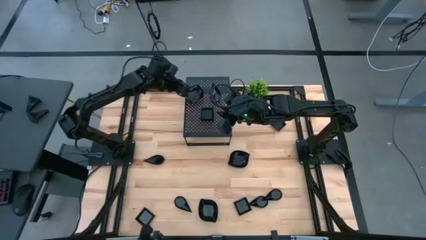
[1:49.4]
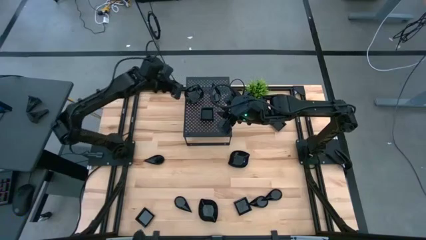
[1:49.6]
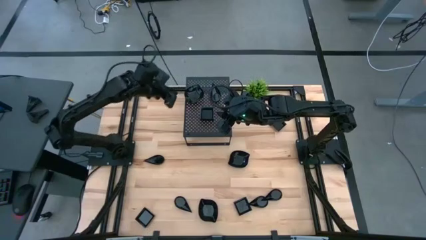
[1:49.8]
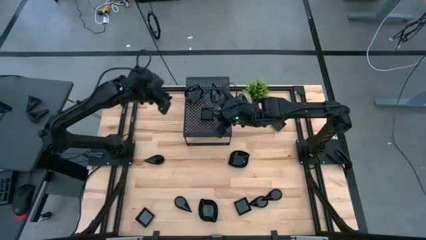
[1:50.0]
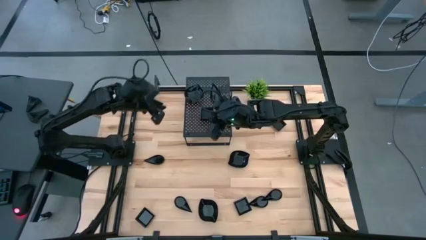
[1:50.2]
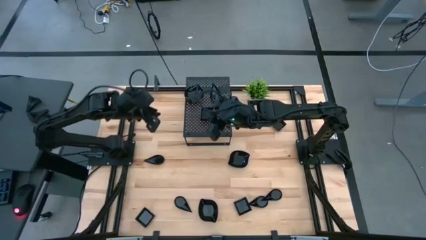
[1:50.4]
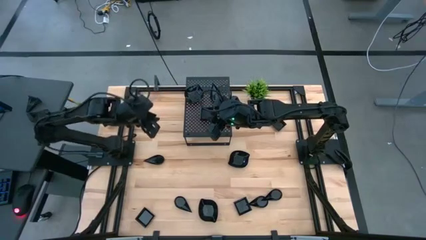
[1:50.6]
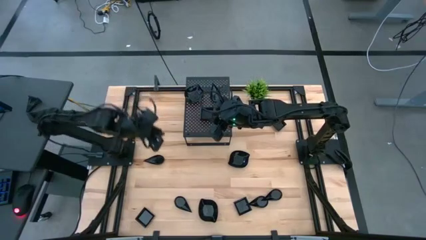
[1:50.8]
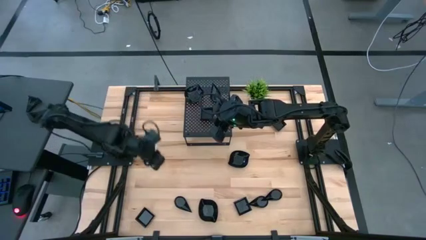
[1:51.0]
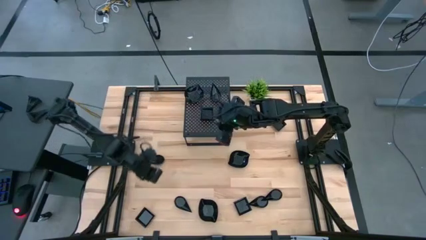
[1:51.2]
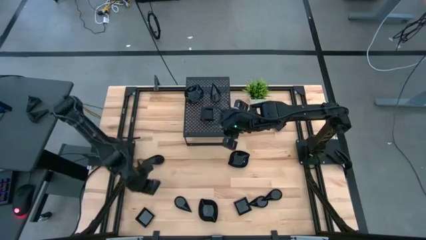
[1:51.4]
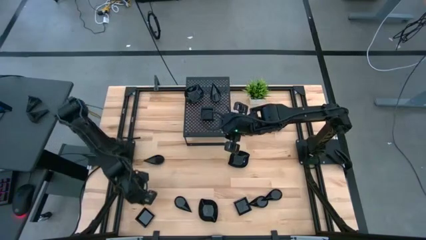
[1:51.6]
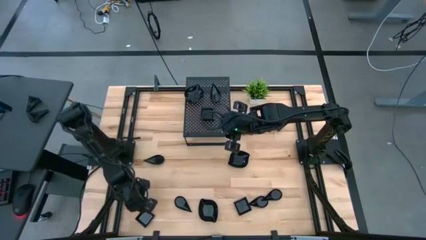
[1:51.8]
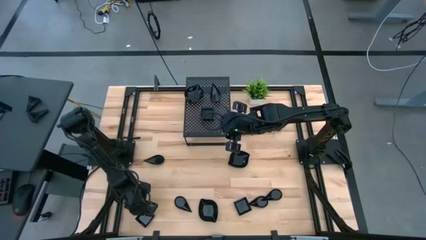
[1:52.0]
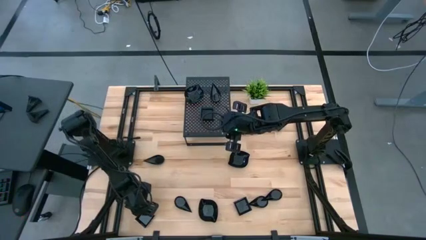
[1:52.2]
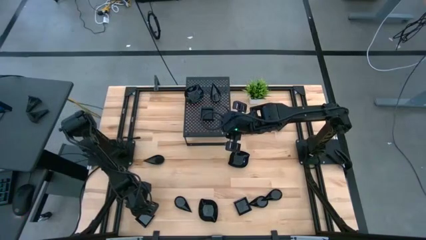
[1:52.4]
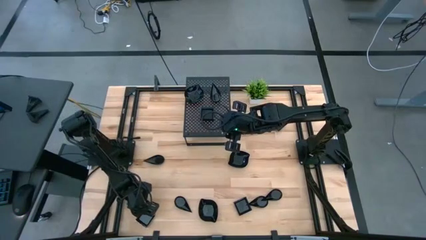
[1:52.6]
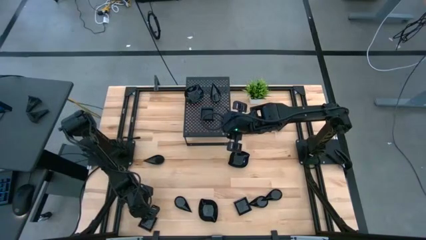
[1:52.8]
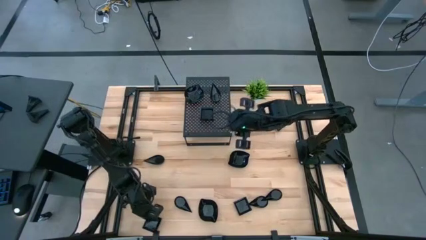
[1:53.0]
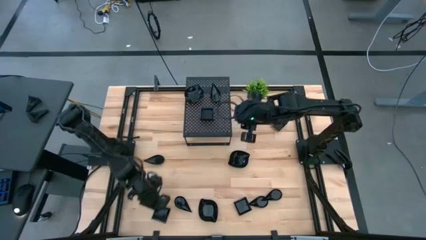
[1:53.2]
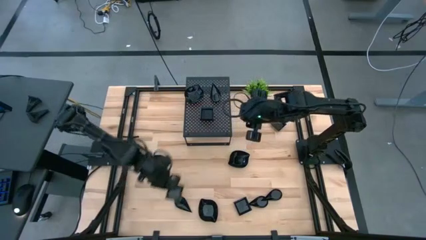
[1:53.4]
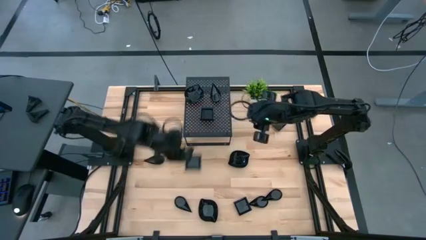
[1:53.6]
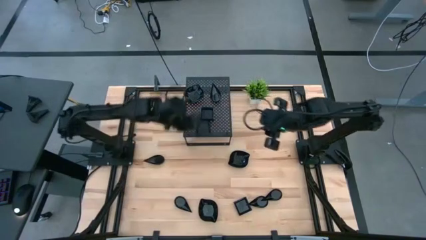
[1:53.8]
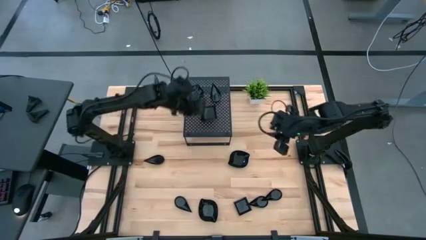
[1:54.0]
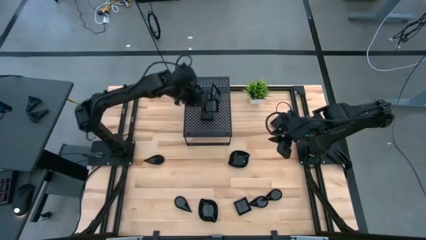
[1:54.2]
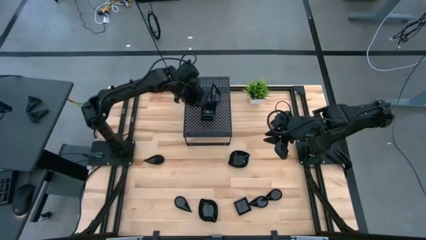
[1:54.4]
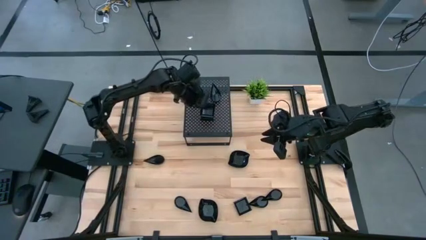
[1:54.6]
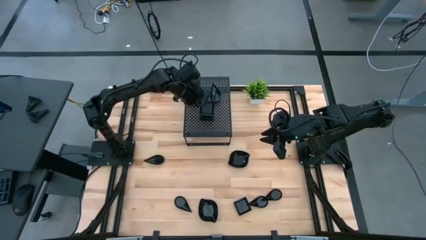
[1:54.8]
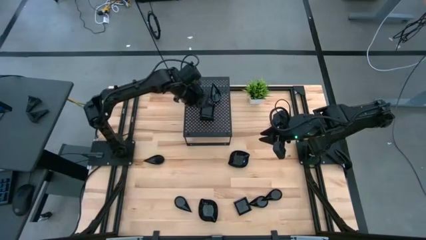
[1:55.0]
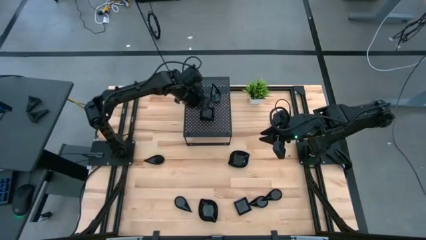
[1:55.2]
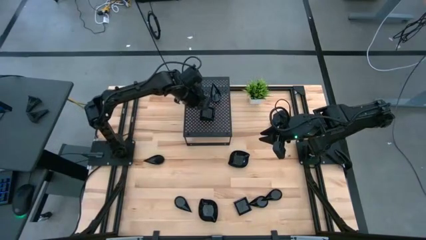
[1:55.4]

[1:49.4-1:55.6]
Task: Pick & Place Mini shaped plates
Stack the square plate on top of the square plates on the shelf

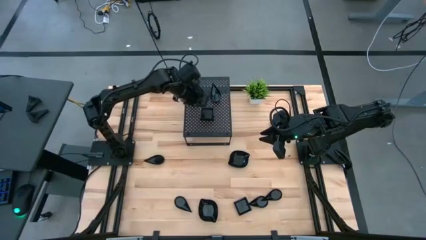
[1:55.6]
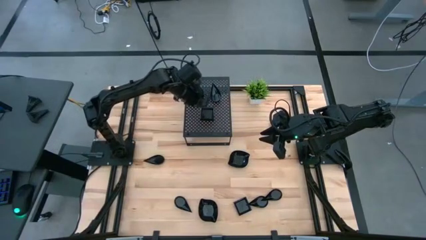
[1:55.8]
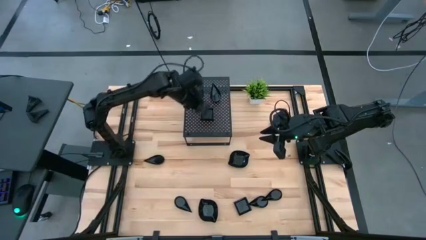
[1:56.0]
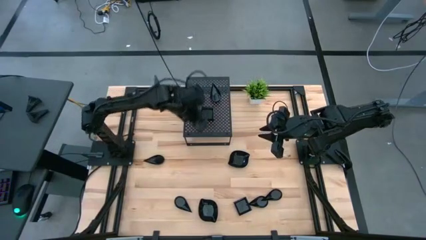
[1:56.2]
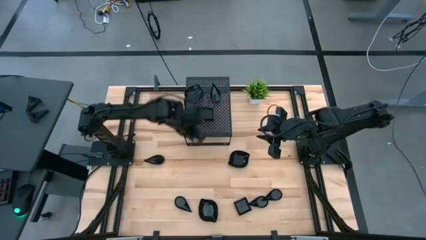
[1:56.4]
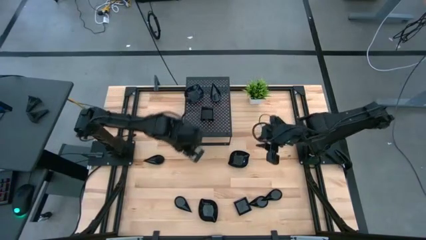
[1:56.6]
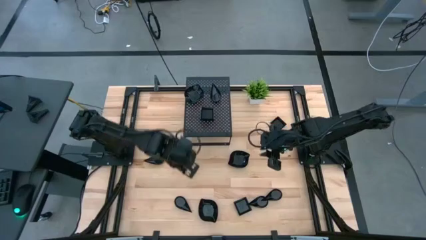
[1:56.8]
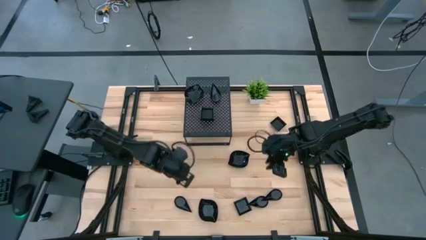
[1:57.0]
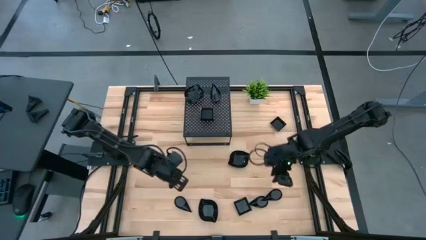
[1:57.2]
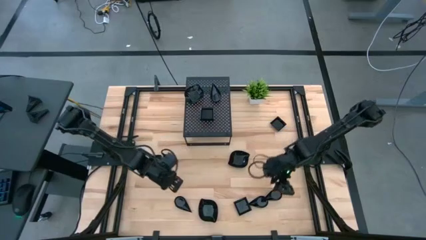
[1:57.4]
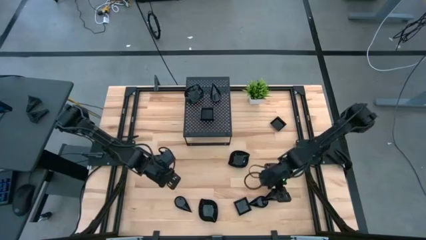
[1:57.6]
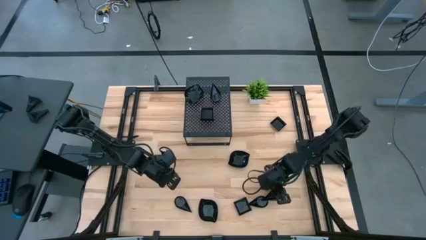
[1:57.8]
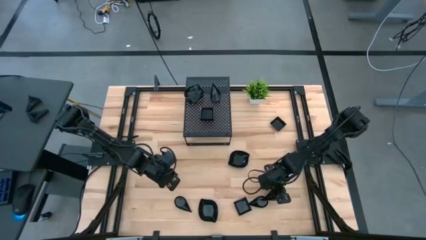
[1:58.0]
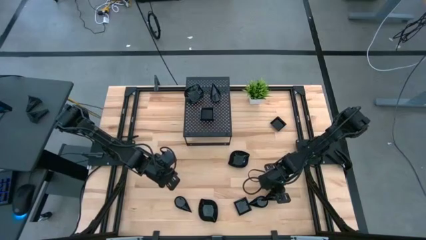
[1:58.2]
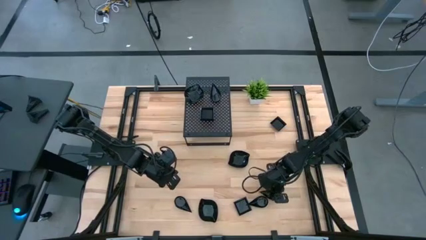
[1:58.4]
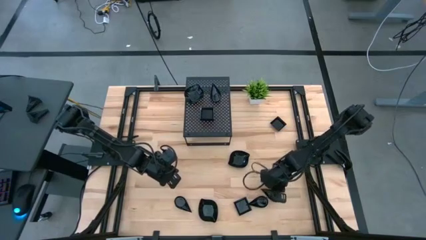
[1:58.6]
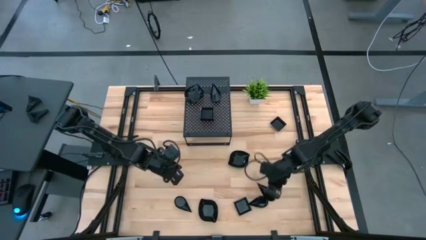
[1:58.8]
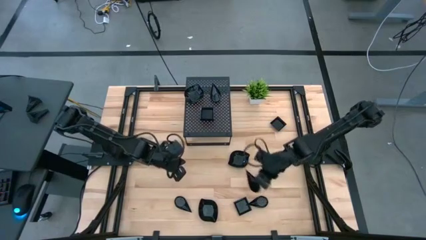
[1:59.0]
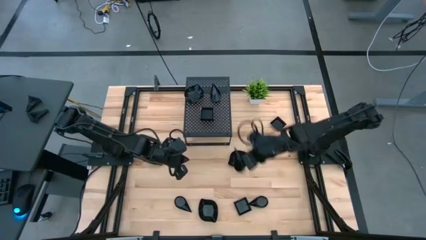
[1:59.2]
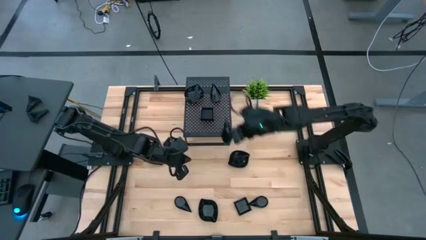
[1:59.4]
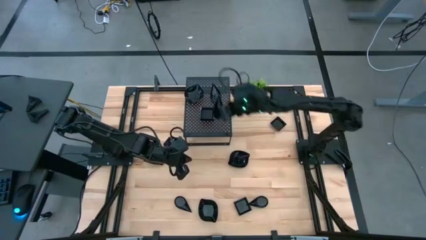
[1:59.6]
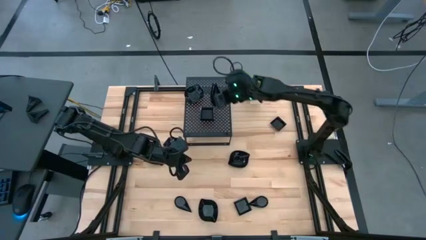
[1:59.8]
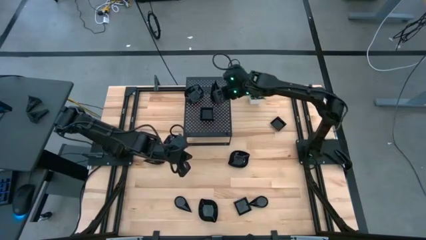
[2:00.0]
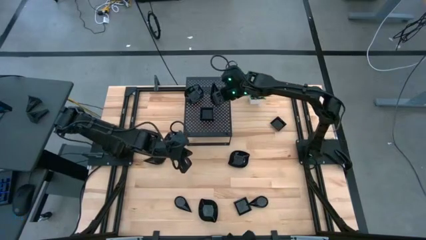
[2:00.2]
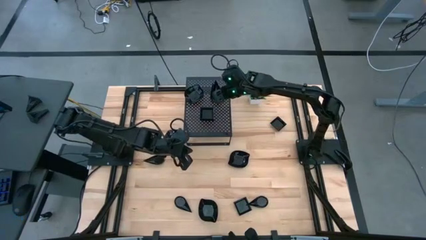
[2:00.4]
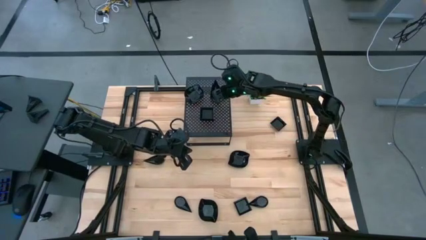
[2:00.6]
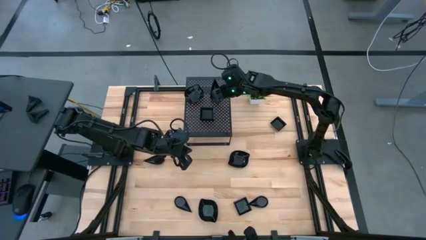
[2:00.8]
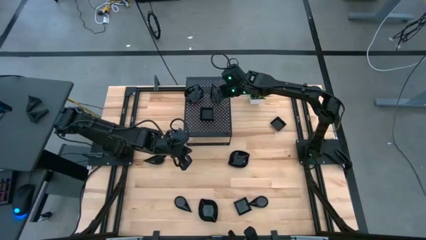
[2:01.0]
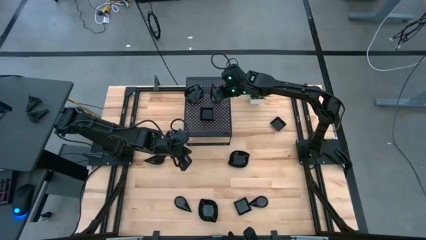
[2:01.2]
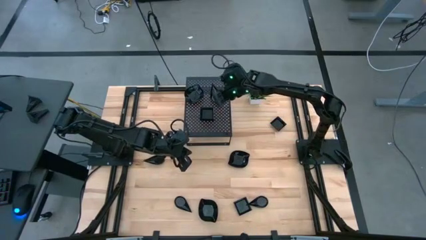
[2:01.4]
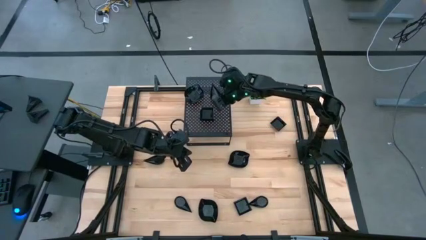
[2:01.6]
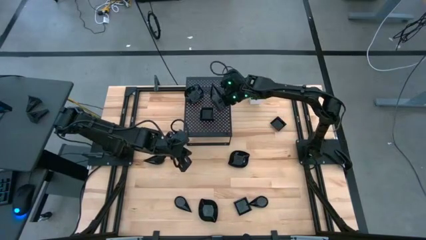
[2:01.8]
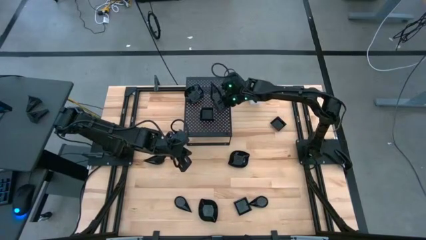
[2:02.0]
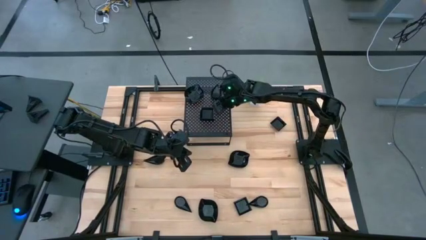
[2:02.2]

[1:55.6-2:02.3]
Stack the drop shaped plate on top of the drop shaped plates on the shelf

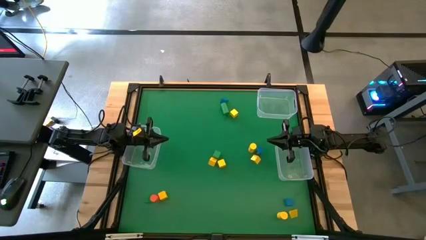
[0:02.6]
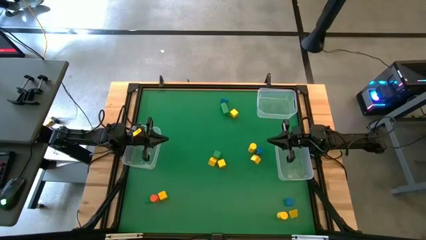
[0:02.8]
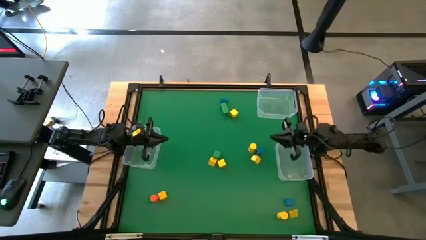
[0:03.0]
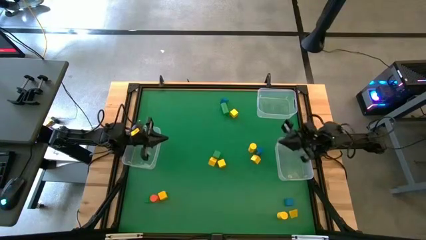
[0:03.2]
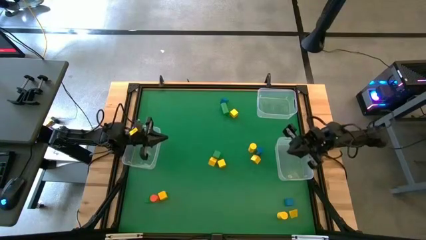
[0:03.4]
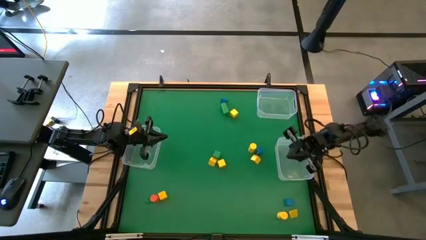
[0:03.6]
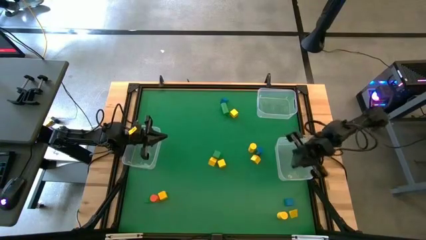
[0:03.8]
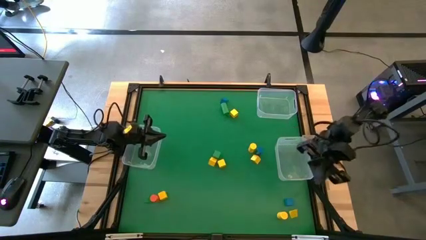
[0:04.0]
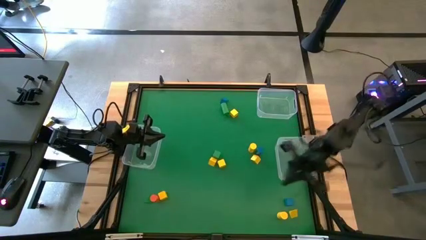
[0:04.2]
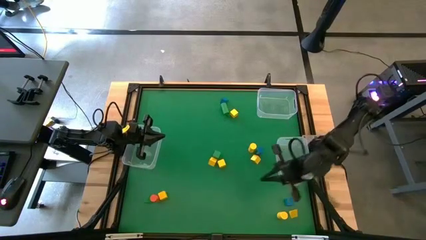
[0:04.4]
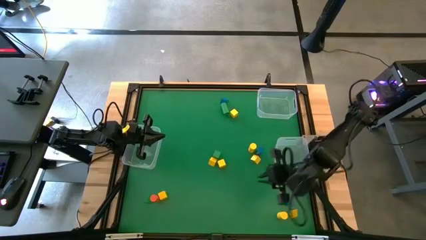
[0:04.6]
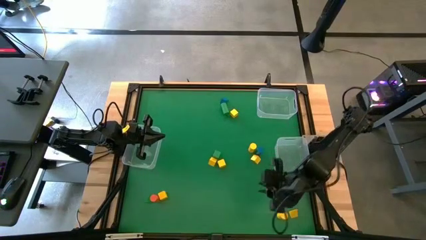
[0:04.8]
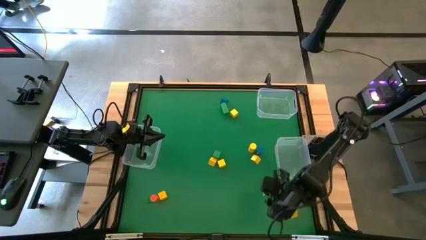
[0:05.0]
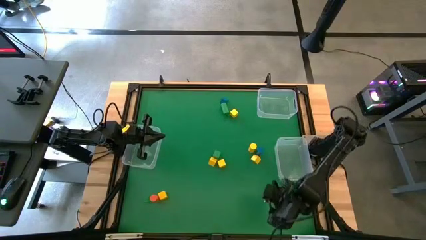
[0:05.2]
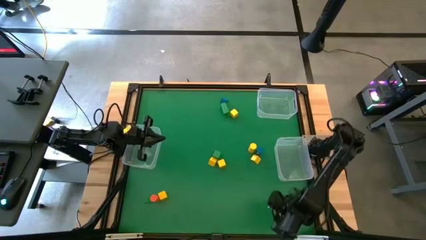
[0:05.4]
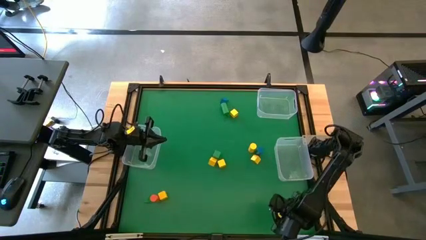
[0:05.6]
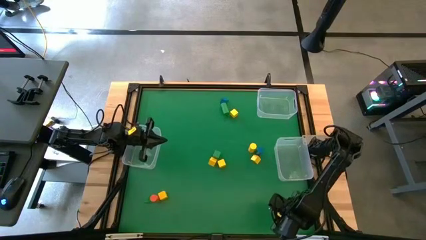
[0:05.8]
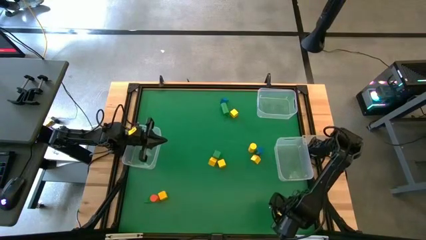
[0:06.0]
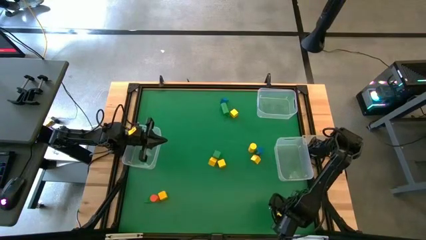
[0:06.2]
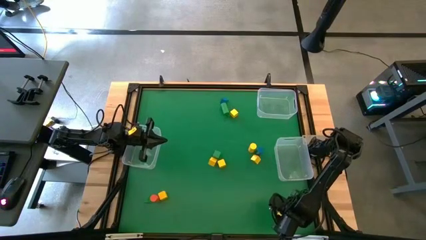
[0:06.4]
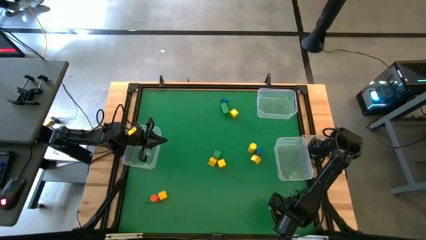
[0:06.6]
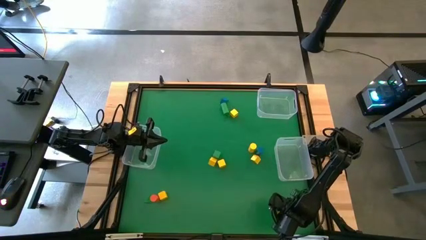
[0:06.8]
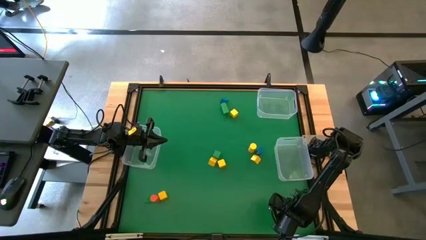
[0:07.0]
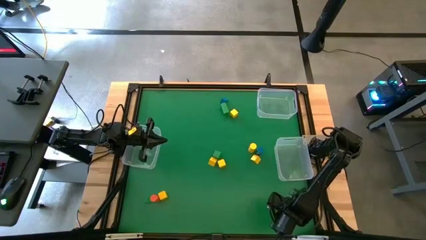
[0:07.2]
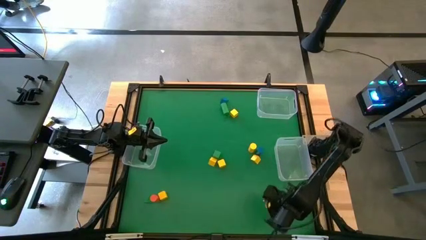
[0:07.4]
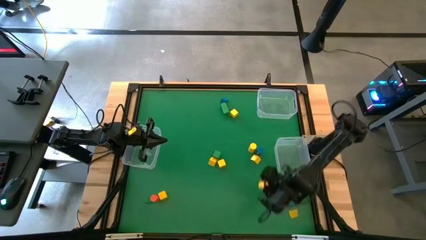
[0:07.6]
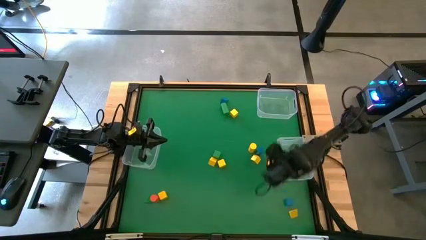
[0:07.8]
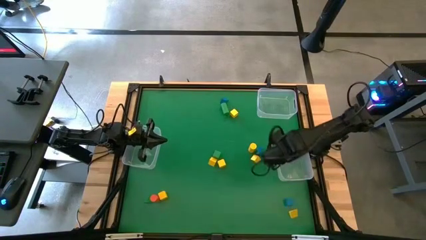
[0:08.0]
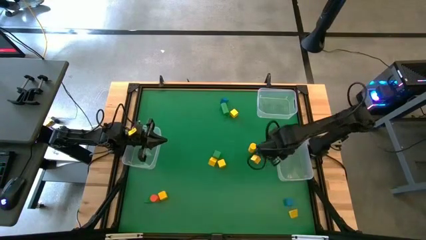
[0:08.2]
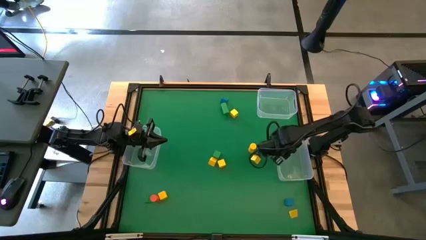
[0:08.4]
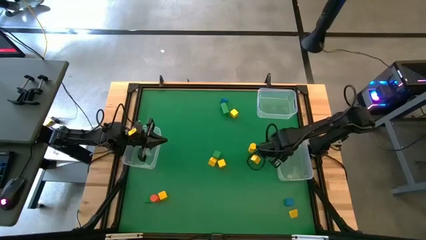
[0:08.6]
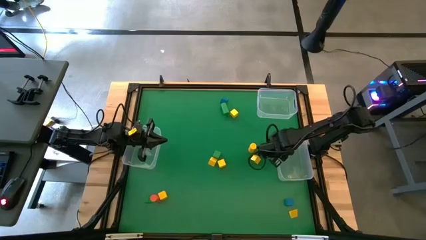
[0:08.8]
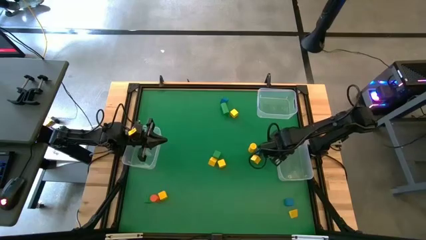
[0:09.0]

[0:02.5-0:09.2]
Task: Sort blocks by size
Put the yellow cylindrical block into the bottom right transparent bin
